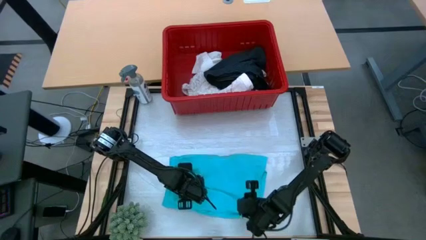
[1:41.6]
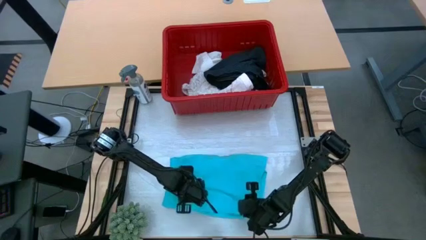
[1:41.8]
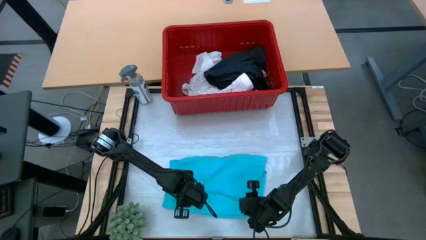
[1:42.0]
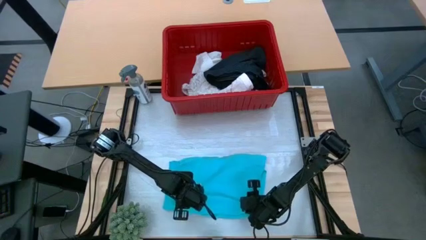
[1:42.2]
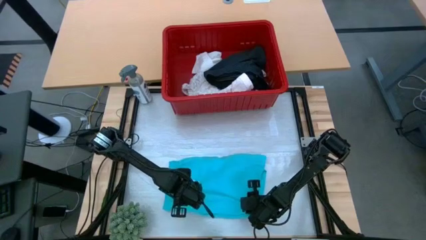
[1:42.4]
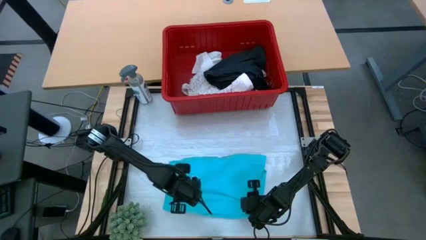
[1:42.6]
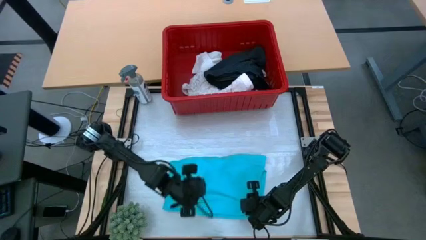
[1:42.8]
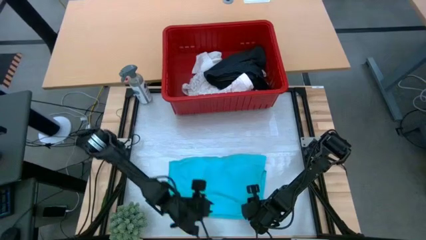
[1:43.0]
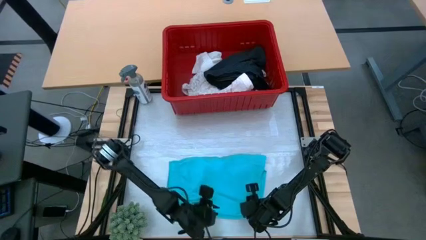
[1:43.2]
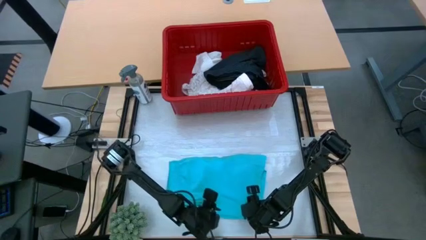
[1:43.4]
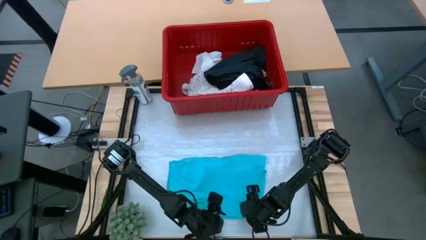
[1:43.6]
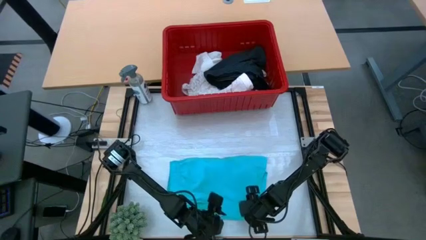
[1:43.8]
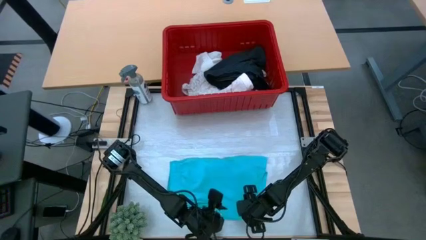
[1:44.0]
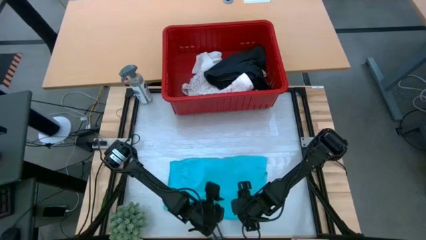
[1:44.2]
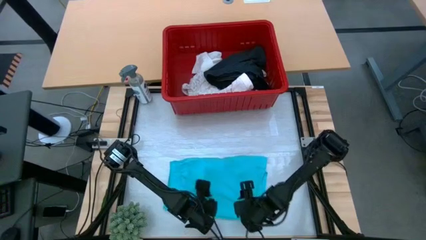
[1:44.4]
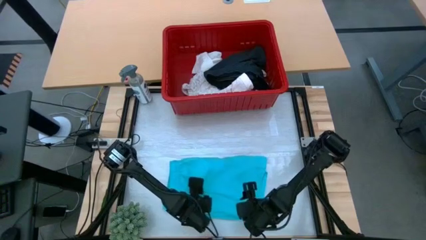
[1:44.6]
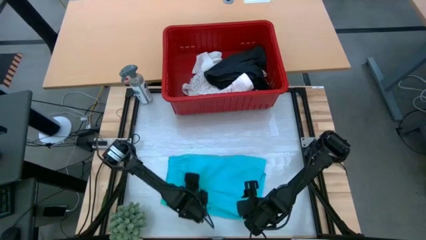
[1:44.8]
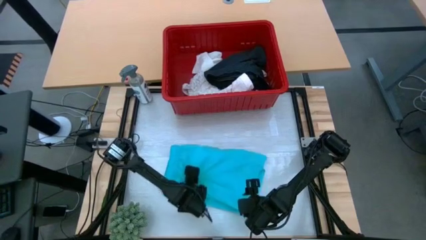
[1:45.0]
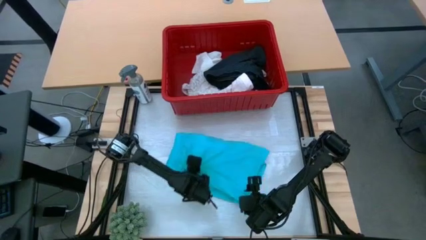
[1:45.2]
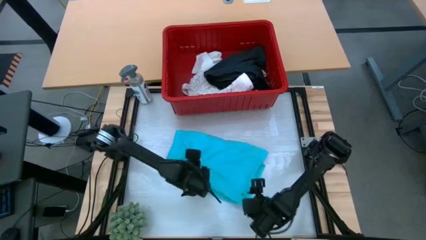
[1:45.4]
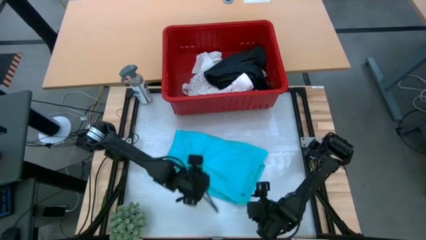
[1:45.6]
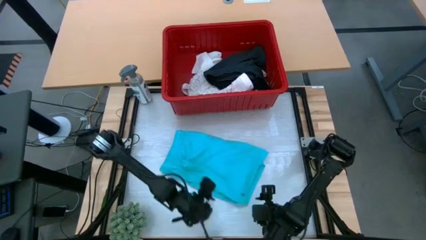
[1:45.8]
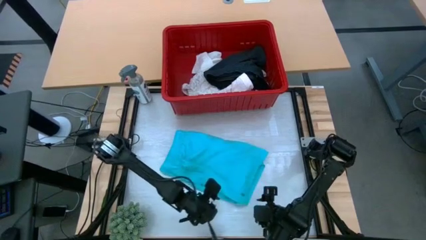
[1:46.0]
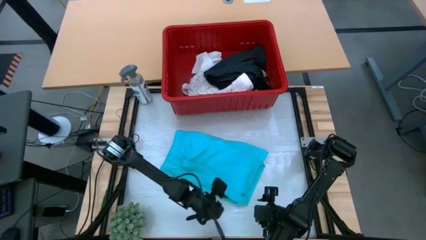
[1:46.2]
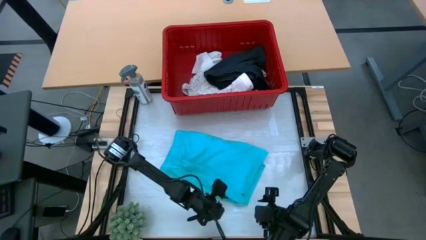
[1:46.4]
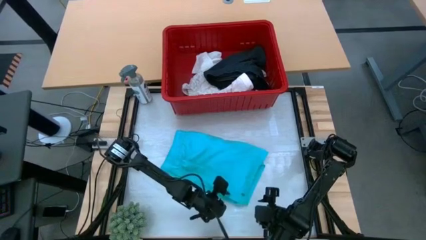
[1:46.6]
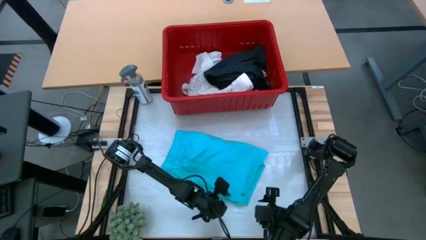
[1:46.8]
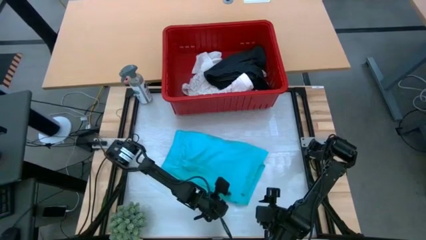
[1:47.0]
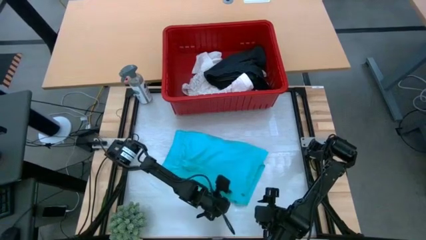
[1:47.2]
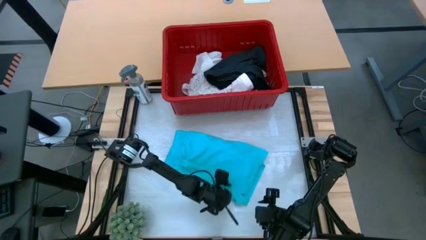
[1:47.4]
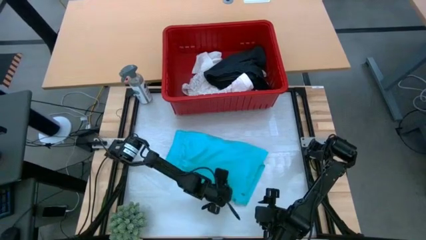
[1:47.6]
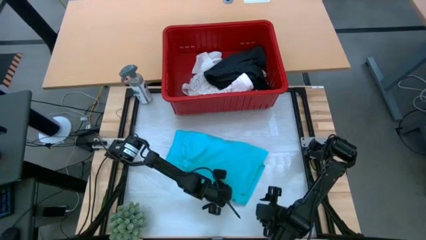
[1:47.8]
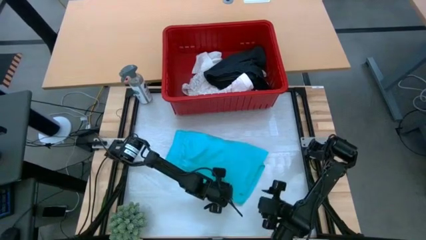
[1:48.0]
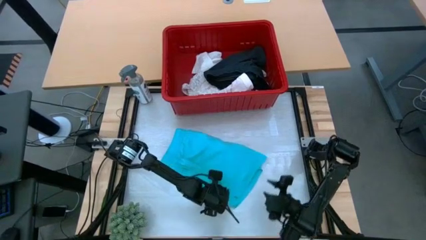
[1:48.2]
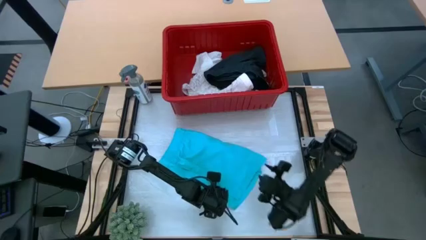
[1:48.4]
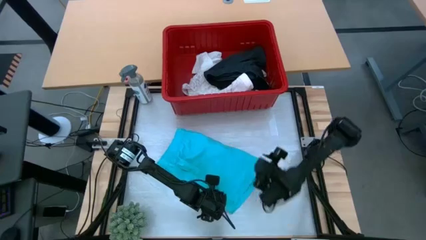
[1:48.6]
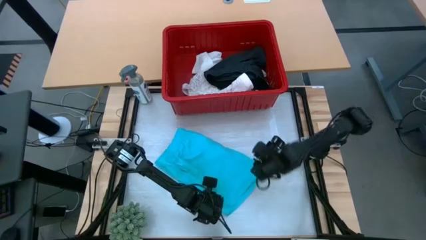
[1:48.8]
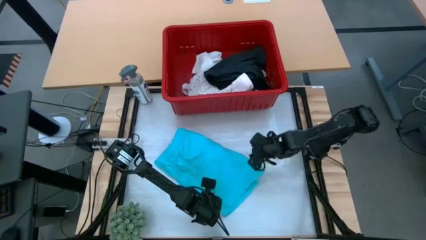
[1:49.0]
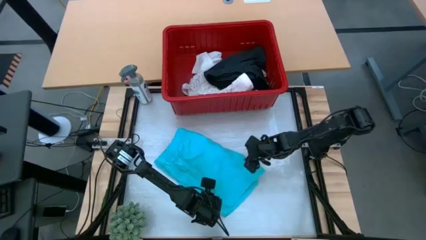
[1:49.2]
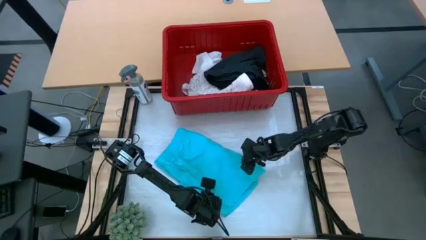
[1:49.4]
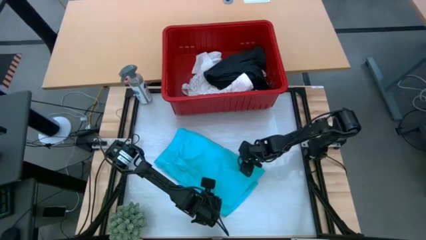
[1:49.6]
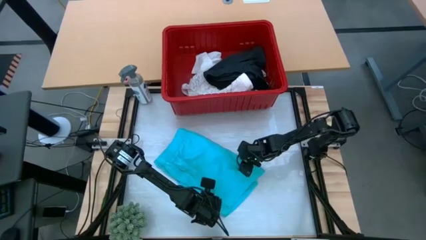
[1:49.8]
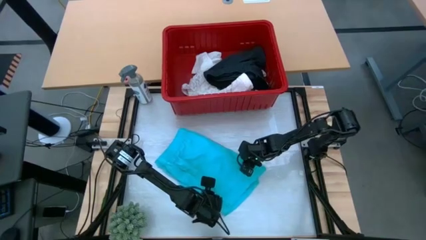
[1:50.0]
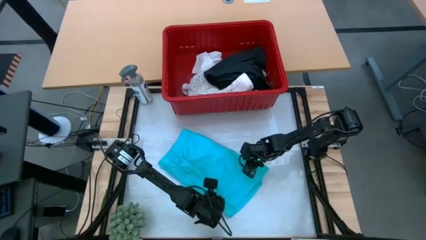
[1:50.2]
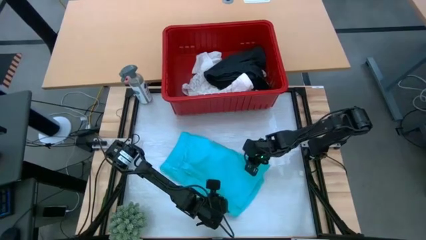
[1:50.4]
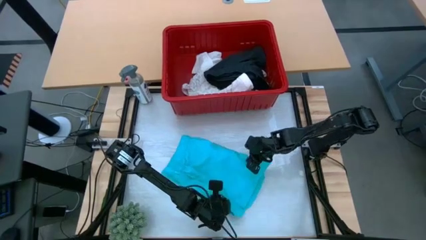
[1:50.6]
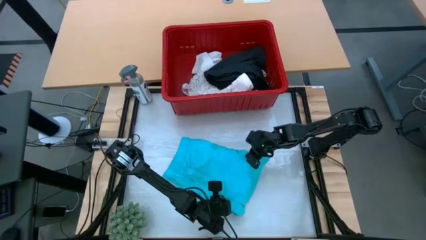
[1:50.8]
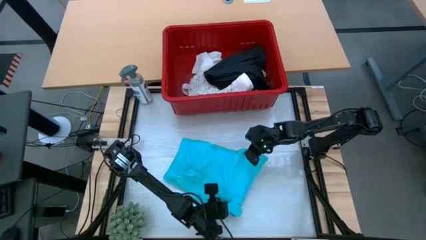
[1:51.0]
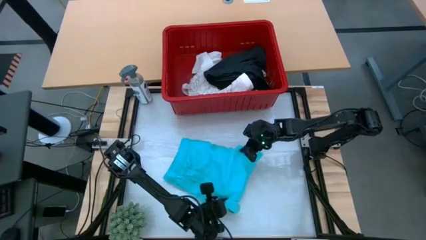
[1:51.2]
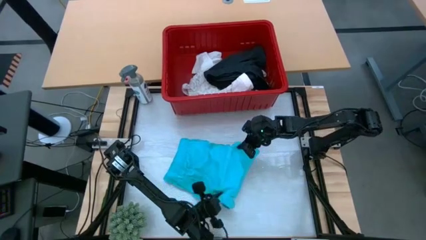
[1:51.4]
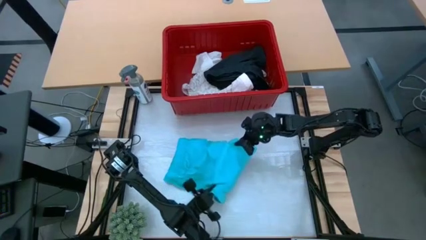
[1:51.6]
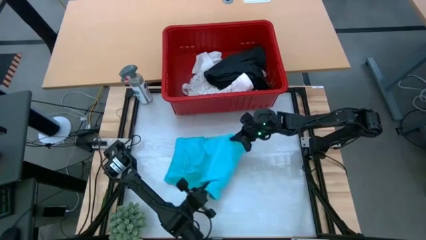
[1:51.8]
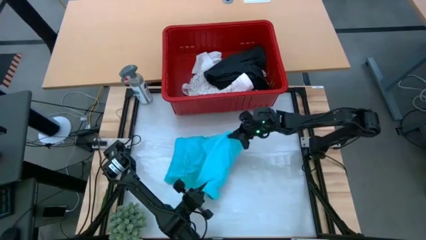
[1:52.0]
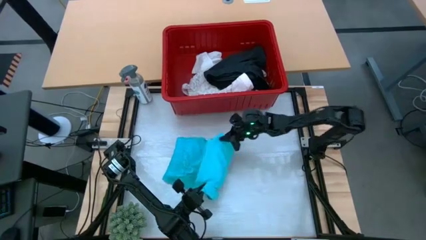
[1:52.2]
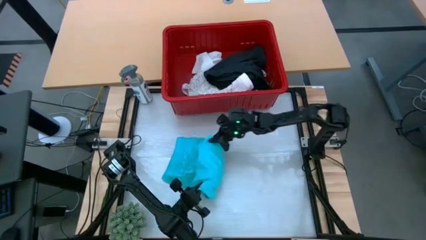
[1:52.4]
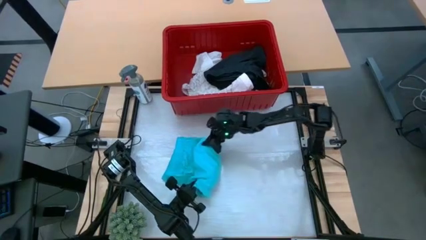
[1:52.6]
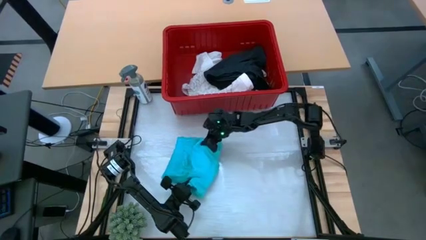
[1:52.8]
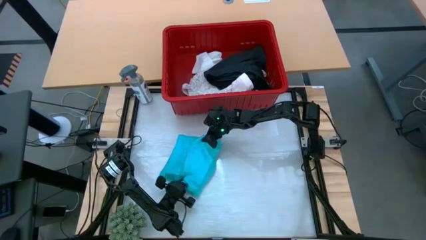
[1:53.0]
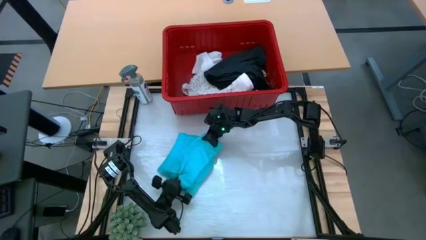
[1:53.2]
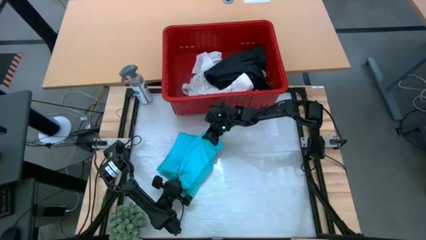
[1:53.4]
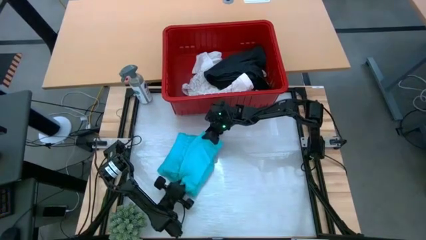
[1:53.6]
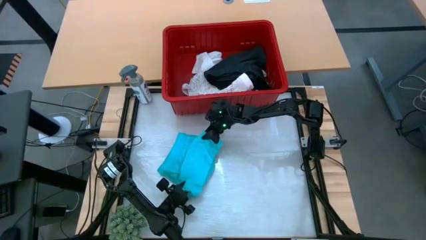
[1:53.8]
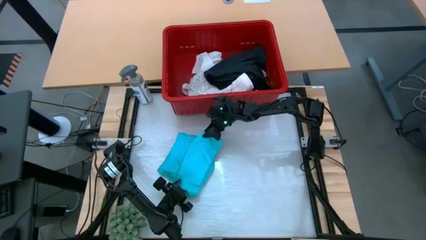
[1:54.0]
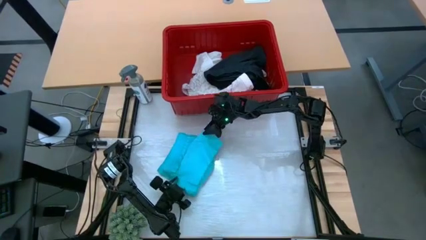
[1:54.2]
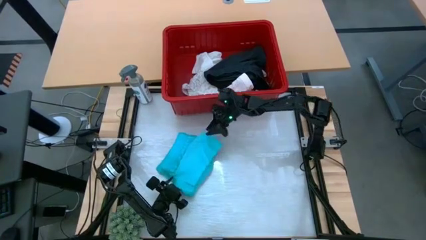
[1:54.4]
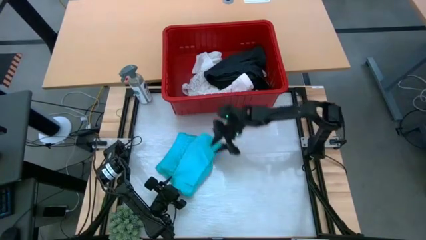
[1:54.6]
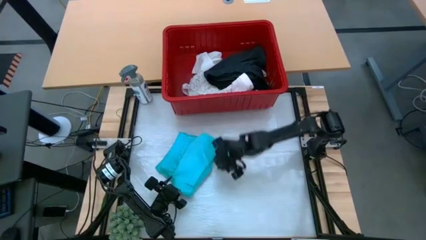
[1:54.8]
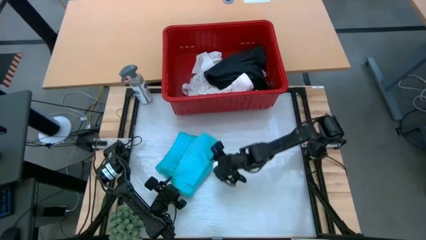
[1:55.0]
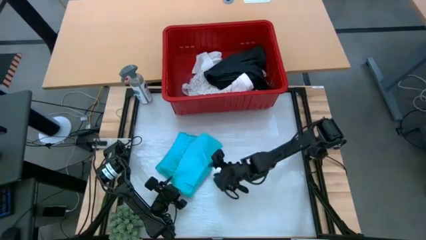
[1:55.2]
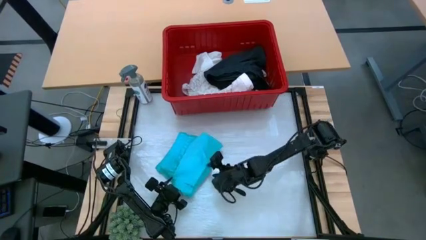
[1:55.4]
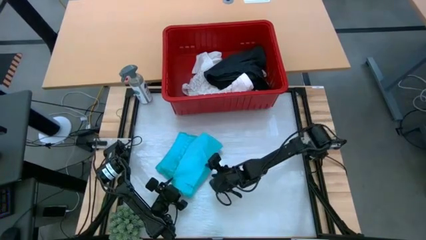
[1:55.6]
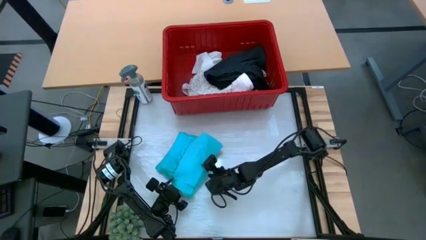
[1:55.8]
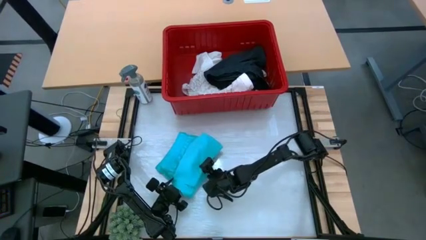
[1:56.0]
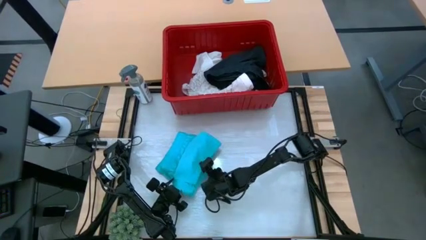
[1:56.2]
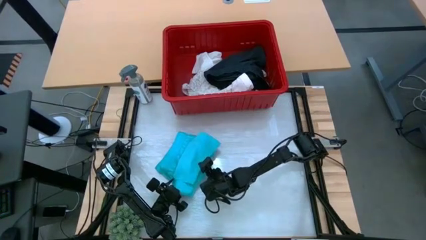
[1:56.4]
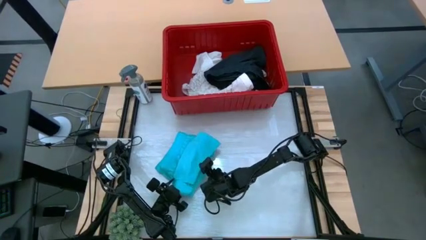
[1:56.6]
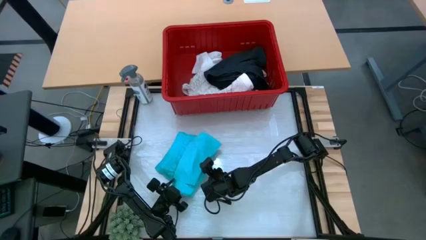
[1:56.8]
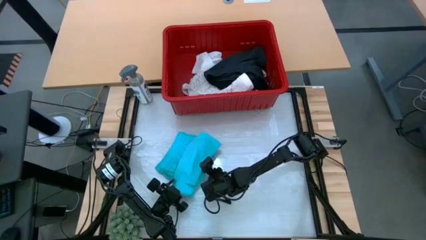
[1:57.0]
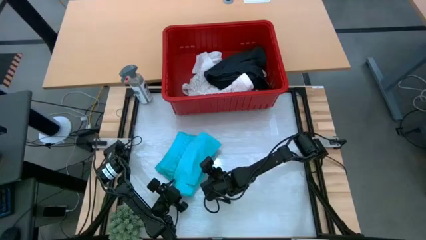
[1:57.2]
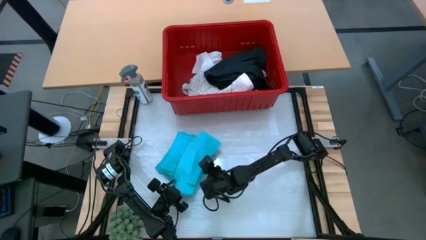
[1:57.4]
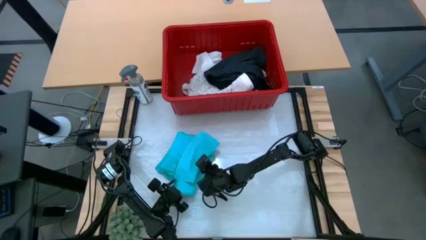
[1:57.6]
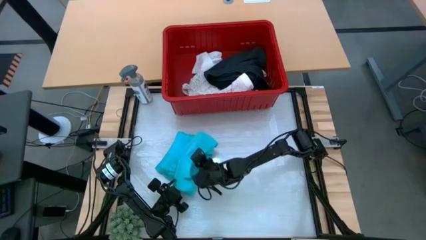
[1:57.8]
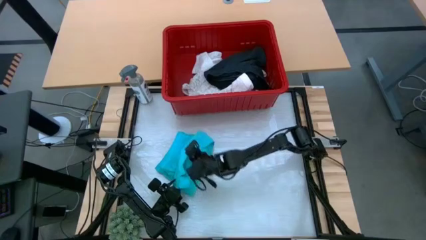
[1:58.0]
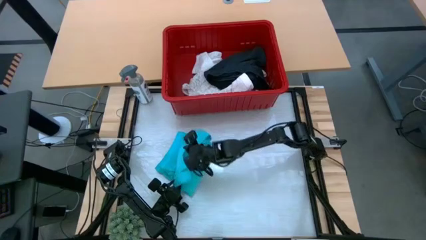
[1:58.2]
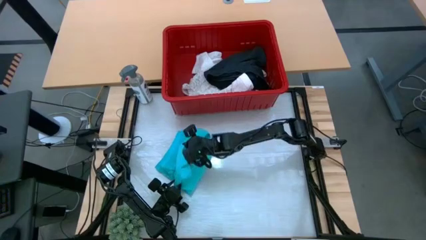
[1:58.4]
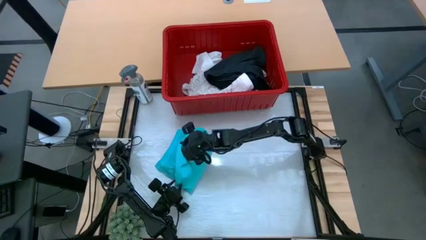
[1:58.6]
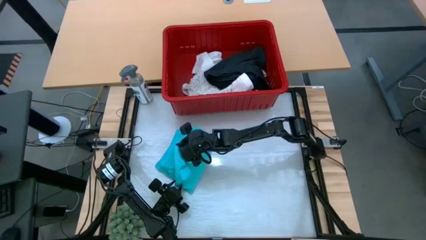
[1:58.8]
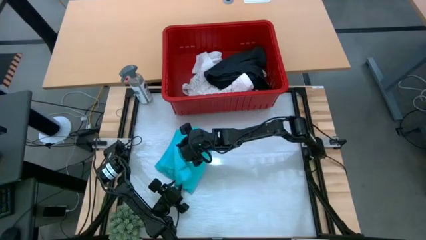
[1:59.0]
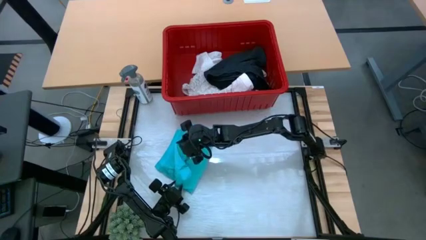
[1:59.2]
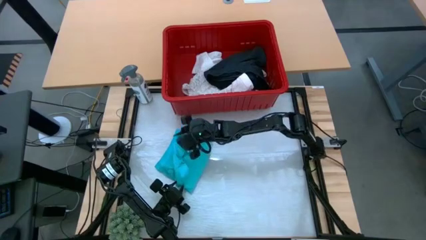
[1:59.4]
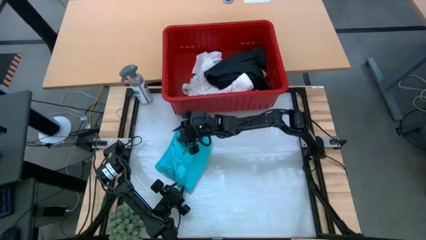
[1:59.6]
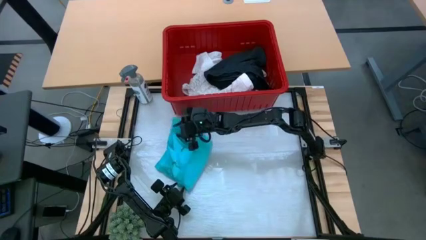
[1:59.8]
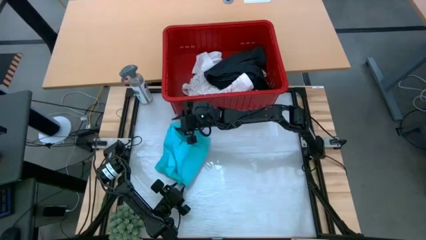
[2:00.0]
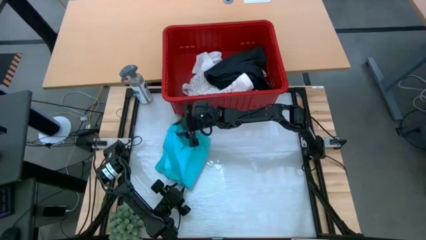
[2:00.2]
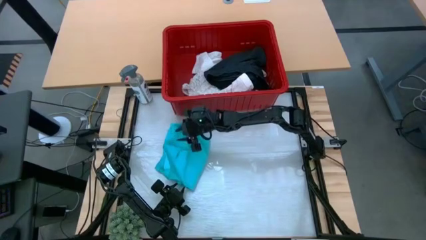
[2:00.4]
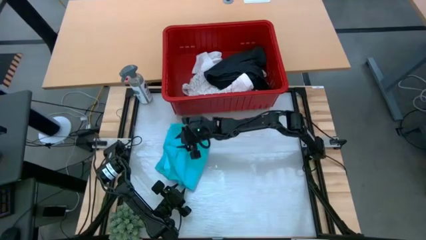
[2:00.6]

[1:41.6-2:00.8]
Task: Fold laundry
Fold the light blue shorts
